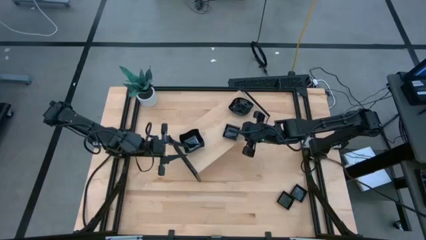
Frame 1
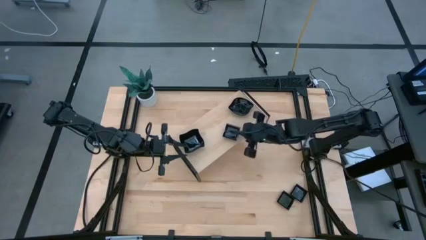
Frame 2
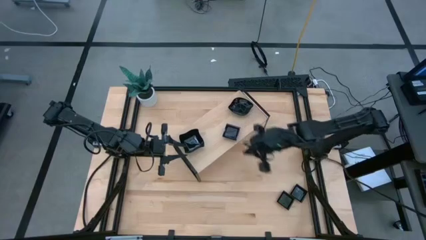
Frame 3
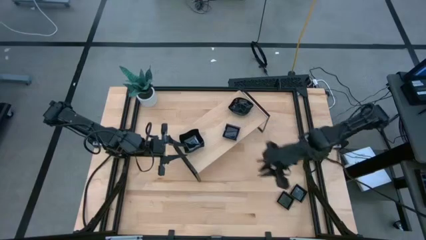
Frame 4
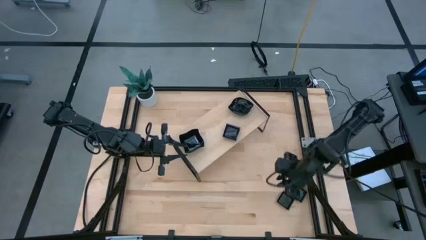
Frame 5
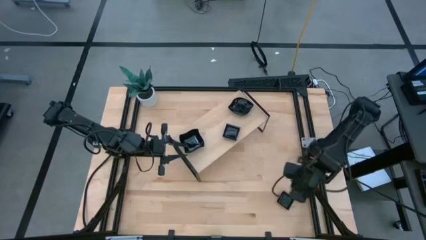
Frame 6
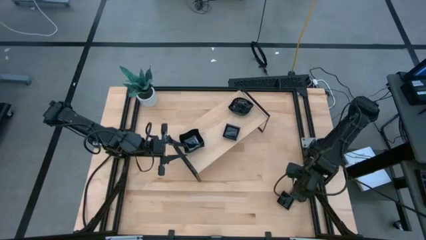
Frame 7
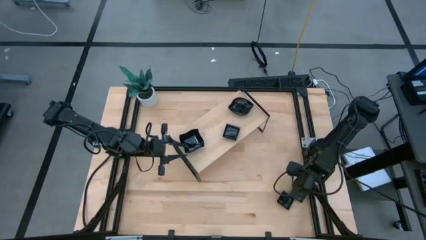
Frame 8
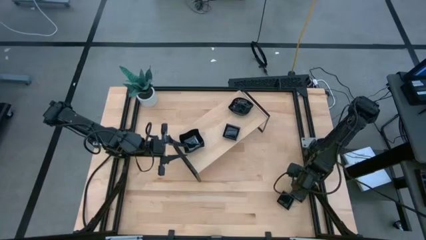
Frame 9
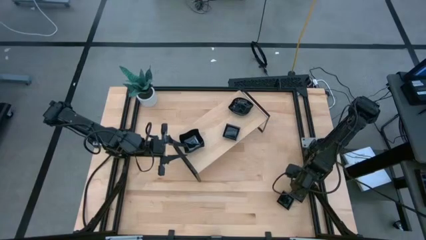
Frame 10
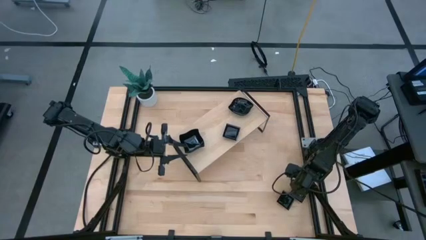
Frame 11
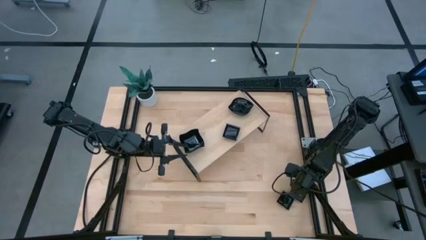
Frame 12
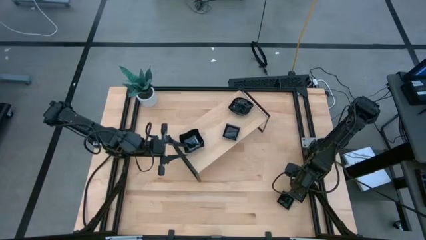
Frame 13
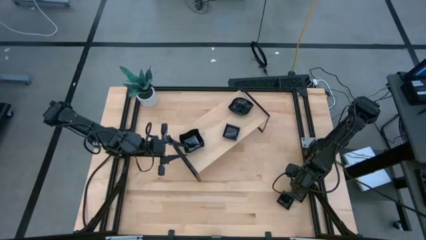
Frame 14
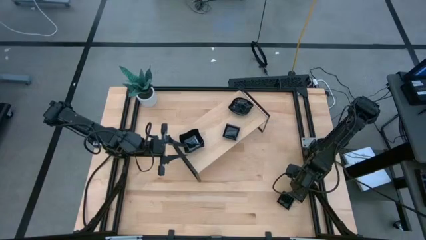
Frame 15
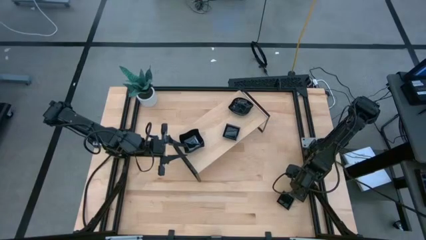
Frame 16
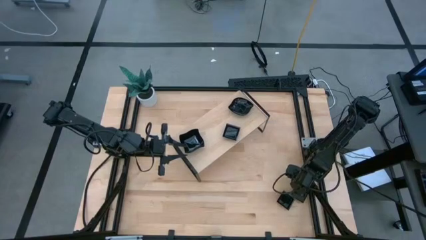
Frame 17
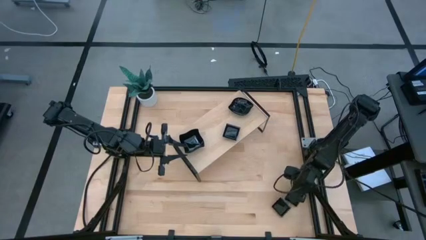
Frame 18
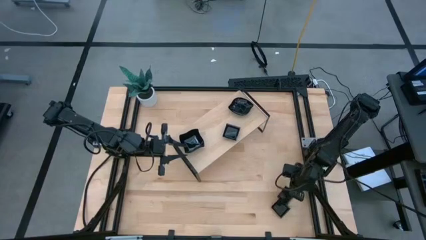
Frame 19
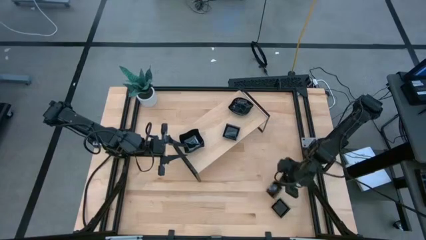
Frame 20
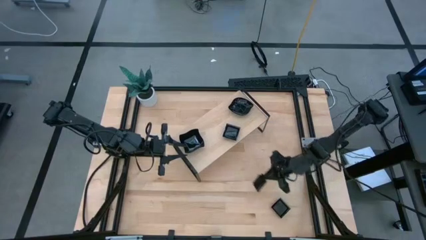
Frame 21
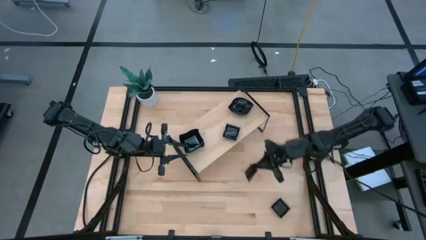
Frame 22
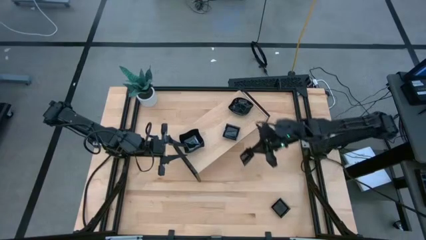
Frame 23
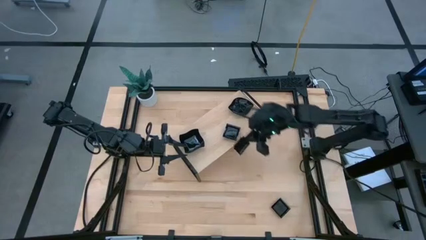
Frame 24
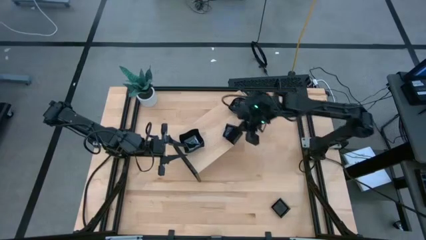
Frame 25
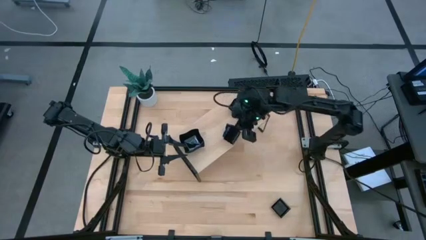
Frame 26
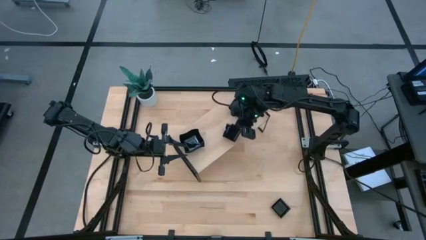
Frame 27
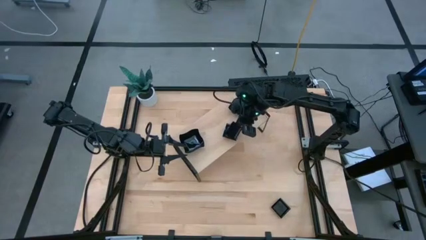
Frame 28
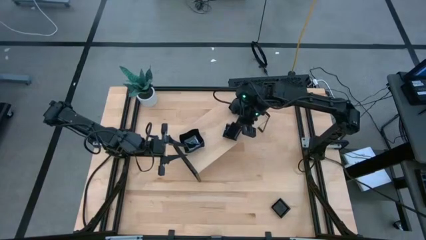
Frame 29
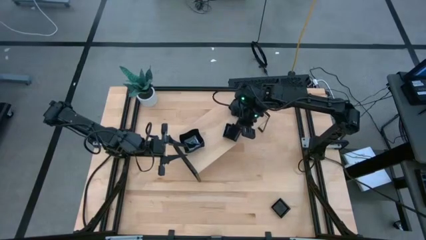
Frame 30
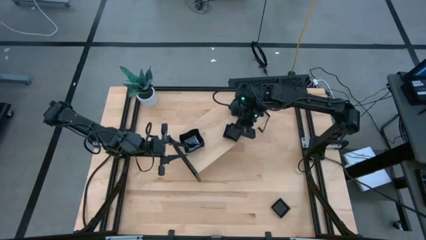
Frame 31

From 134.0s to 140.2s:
Task: Pick & Place Mini shaped plates
Stack the square plate on top of the other square plates on the shelf

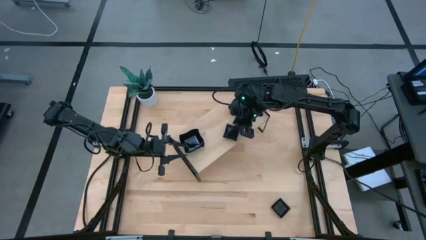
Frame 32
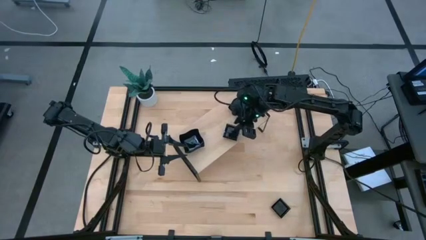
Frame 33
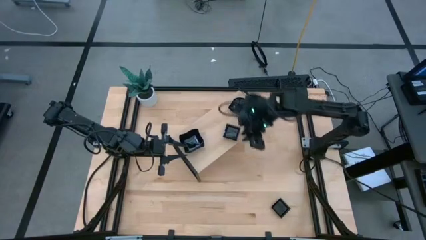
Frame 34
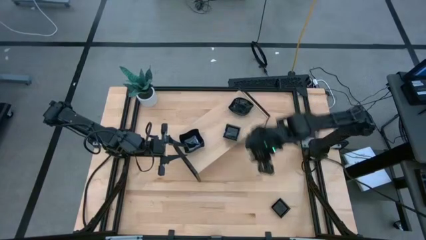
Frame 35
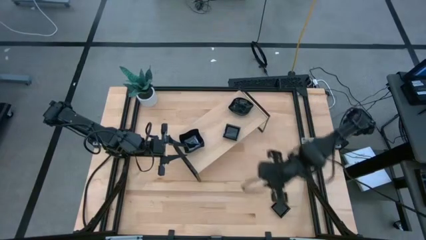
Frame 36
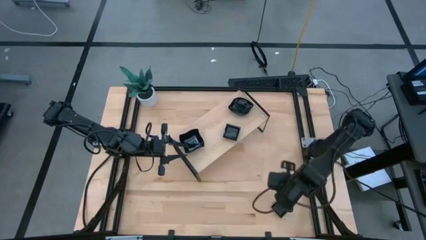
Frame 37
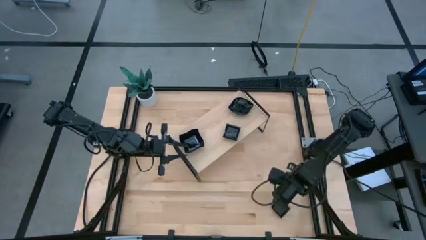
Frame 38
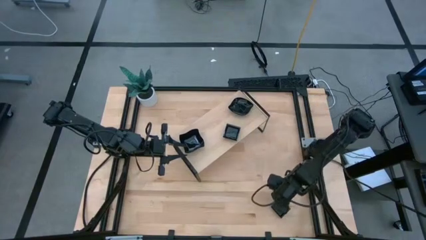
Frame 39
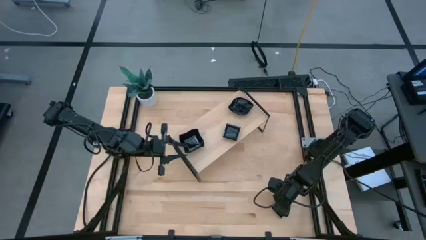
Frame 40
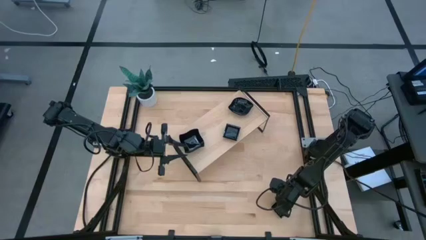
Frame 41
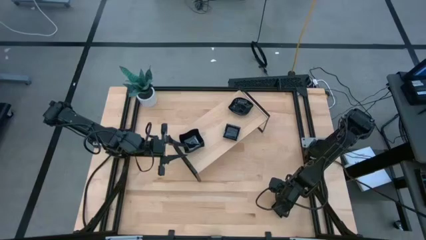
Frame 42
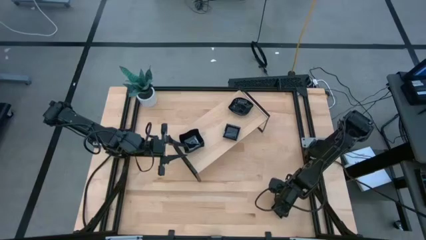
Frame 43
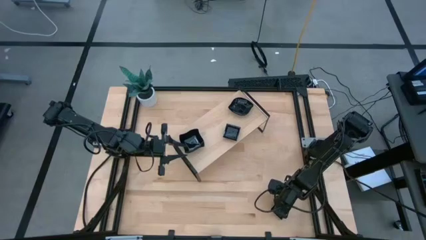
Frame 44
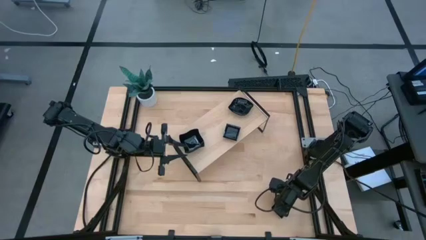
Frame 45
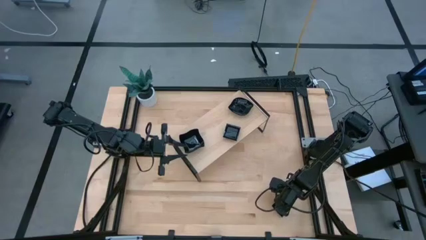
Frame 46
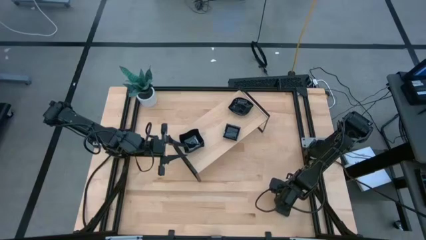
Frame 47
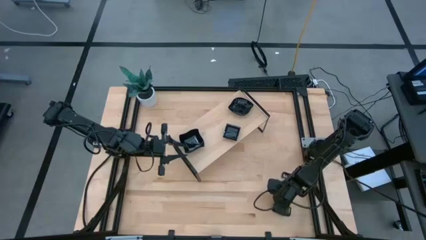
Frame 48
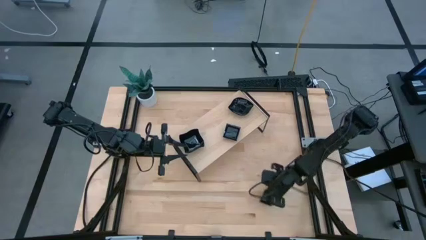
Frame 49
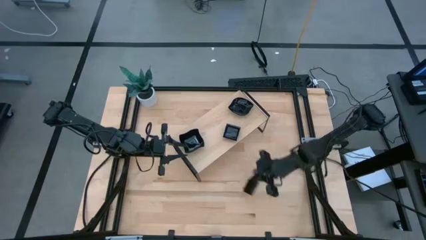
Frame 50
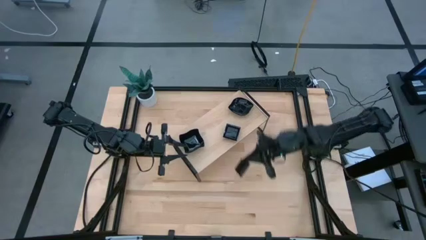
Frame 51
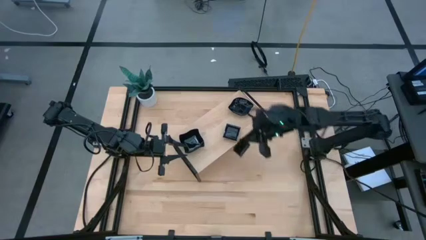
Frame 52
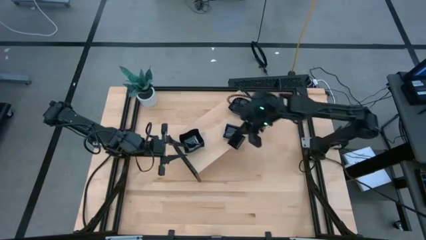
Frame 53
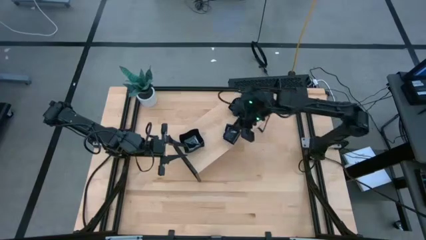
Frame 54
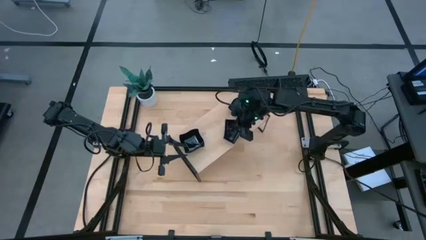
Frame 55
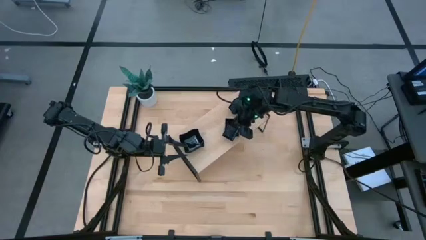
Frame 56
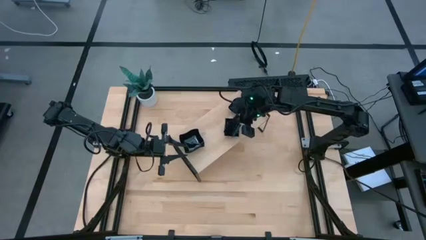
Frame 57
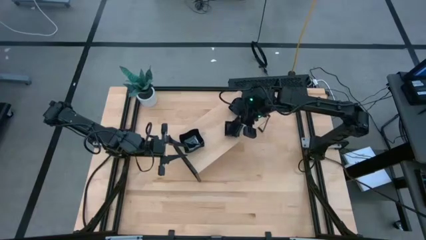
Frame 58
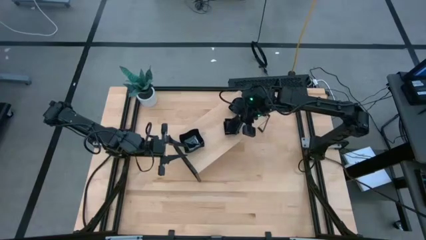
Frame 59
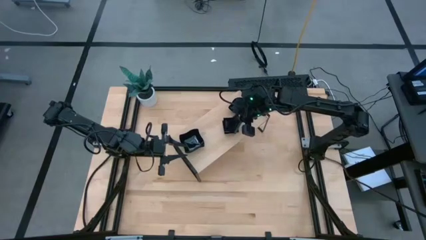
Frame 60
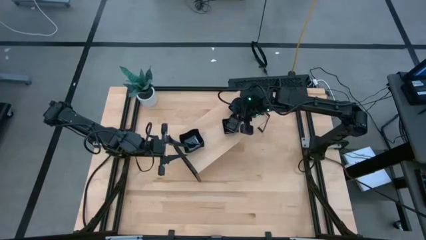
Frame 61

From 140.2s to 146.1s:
Stack the square plate on top of the other square plates on the shelf

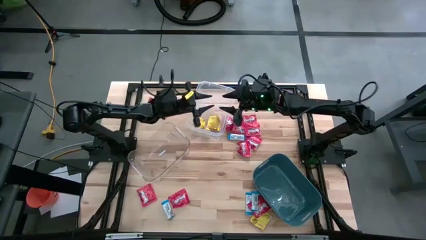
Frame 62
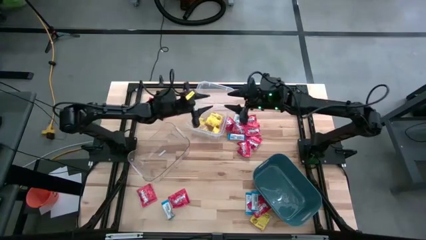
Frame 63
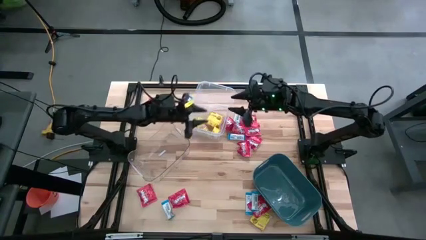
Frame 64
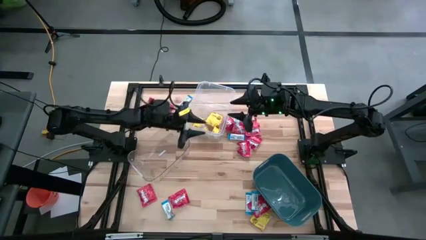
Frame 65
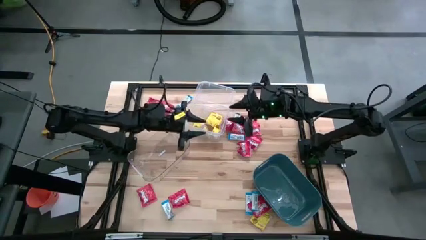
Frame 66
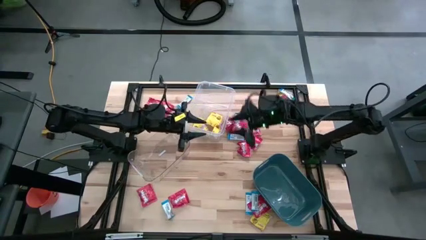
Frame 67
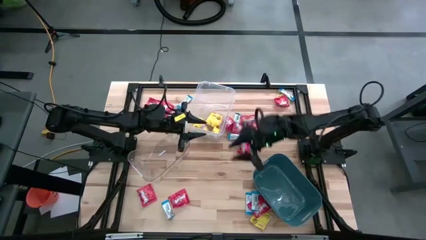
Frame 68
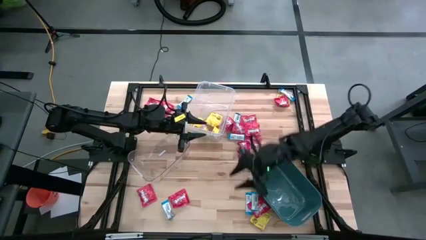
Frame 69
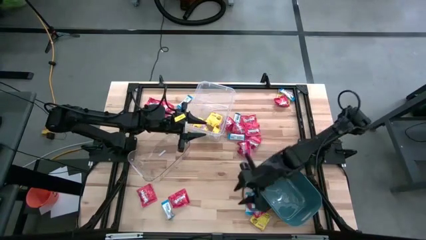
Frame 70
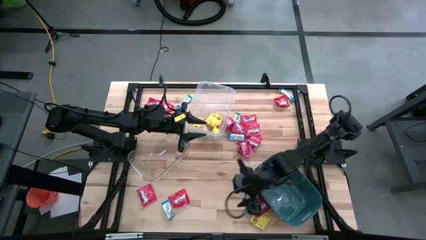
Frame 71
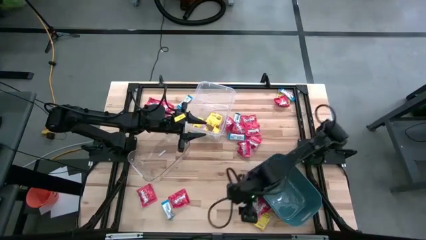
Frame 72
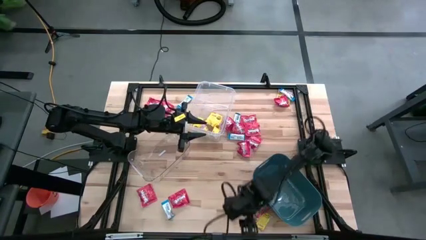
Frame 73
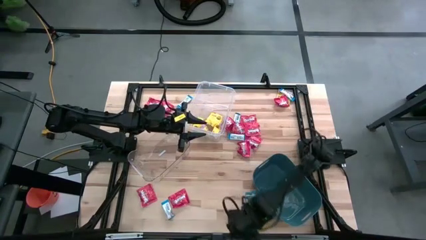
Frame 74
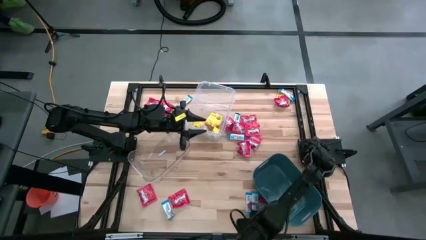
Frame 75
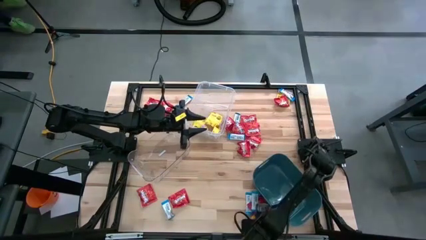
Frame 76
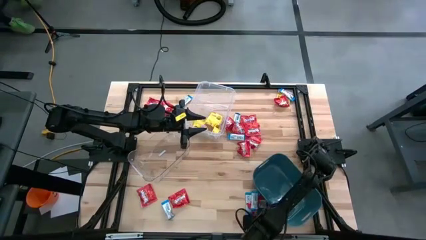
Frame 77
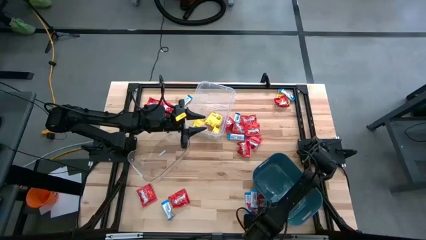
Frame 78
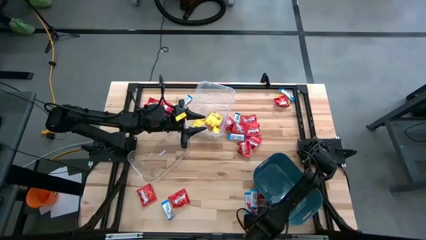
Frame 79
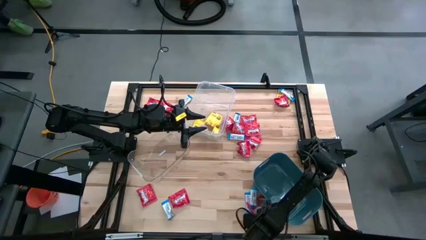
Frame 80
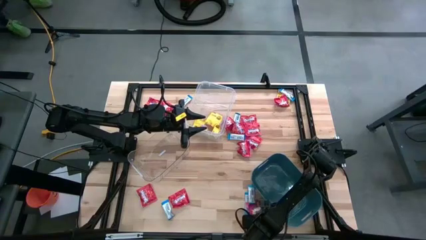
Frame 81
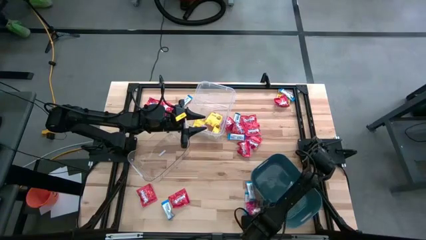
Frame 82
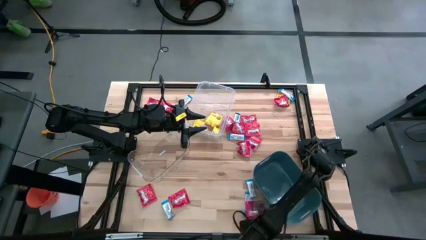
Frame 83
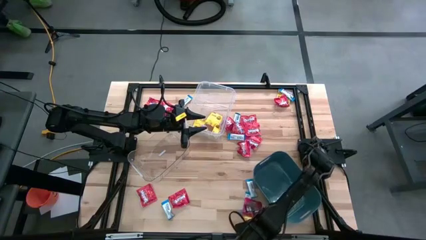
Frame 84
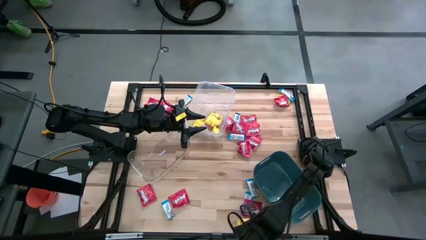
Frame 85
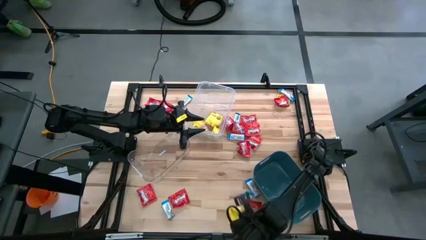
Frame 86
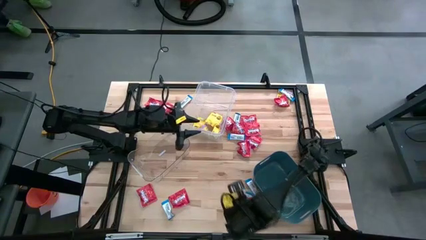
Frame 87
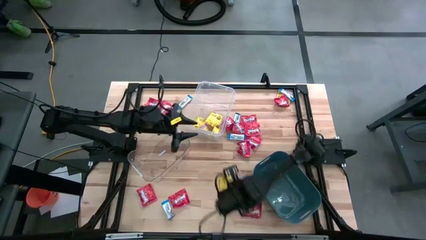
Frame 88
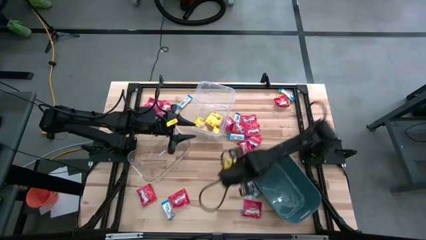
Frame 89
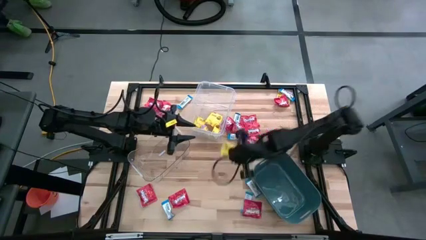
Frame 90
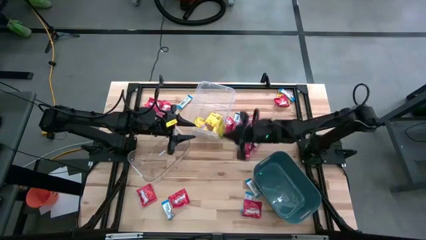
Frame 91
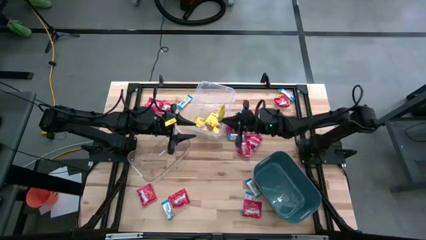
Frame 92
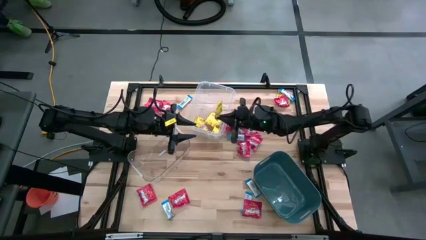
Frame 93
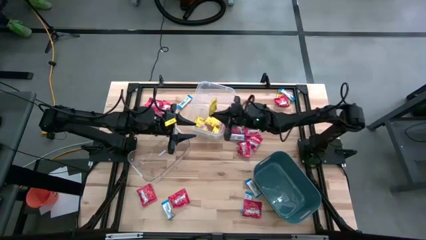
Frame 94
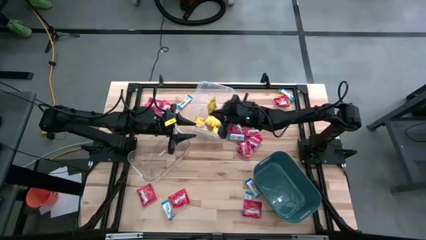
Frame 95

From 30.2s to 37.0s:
Task: Sort candy
Put the yellow candy into the transparent container
